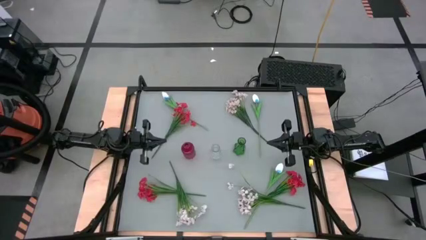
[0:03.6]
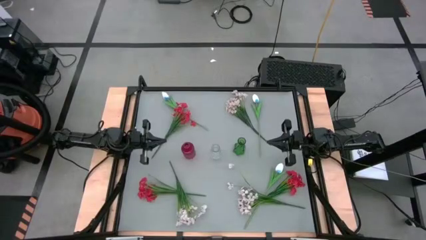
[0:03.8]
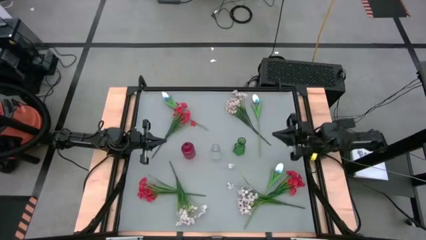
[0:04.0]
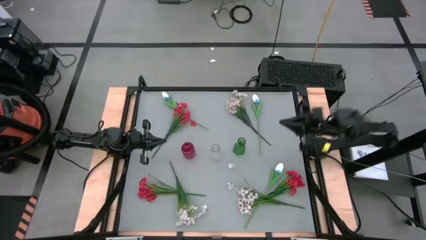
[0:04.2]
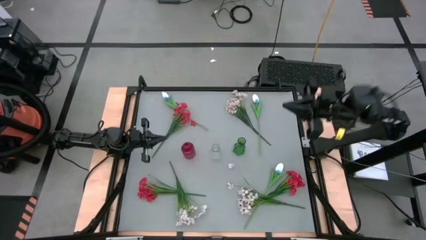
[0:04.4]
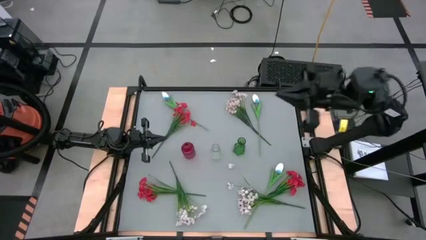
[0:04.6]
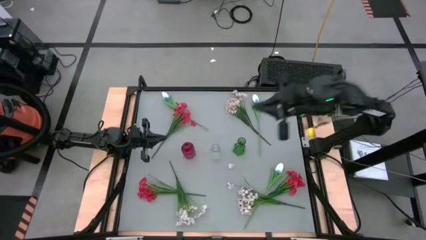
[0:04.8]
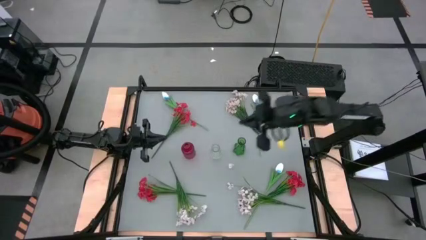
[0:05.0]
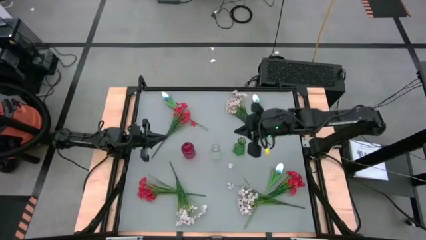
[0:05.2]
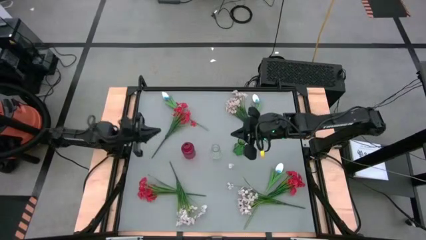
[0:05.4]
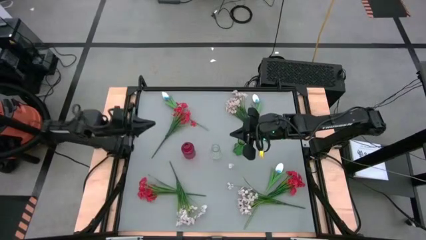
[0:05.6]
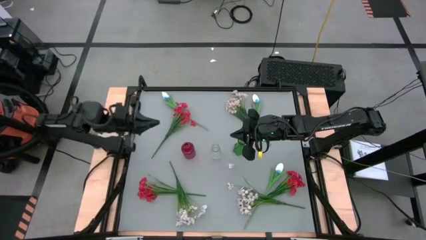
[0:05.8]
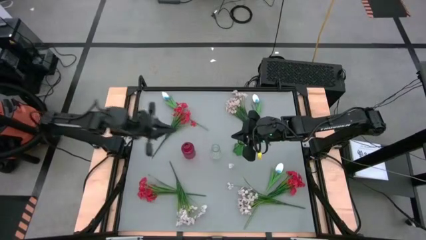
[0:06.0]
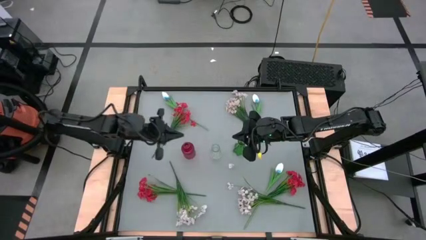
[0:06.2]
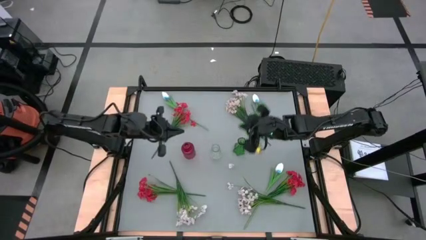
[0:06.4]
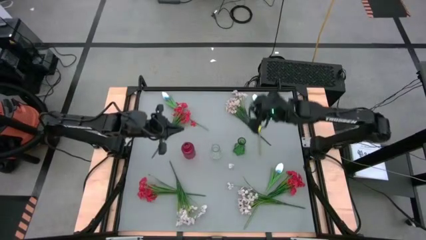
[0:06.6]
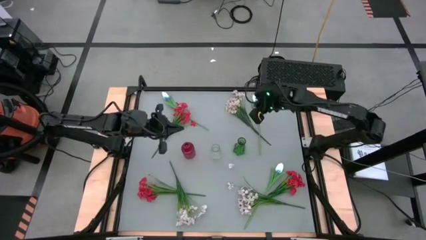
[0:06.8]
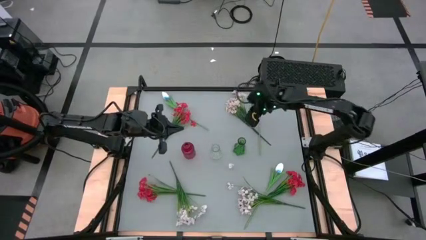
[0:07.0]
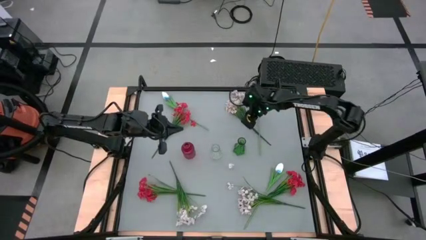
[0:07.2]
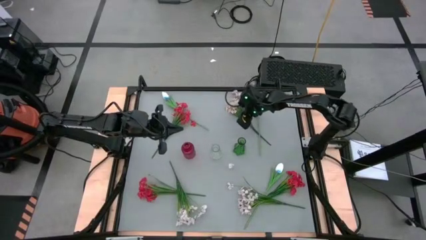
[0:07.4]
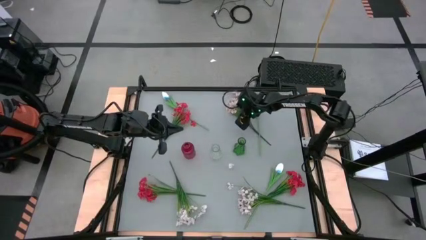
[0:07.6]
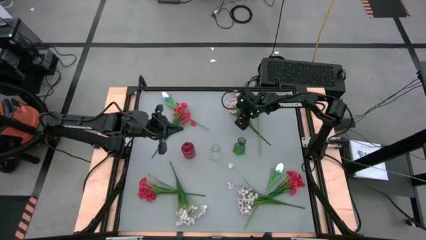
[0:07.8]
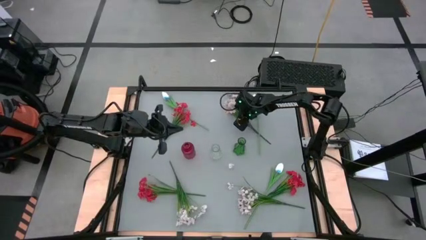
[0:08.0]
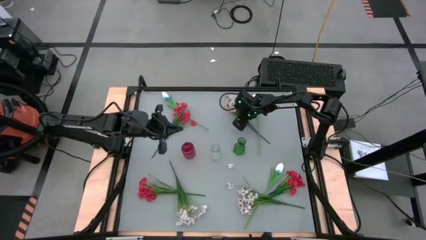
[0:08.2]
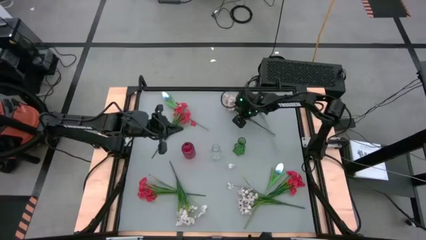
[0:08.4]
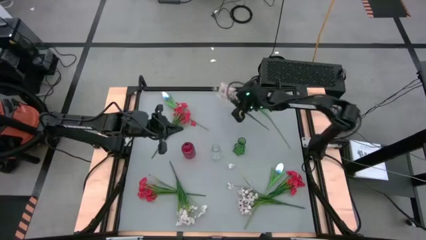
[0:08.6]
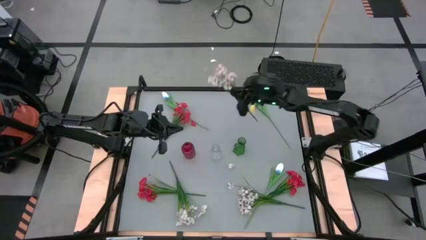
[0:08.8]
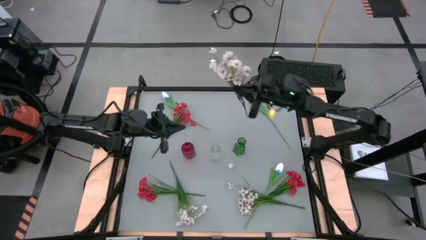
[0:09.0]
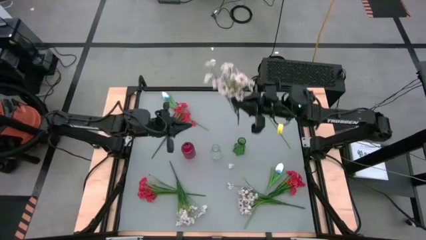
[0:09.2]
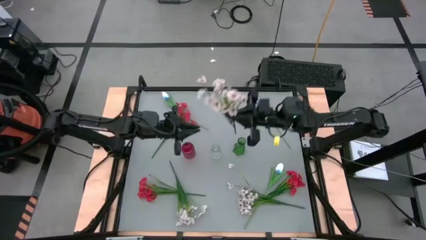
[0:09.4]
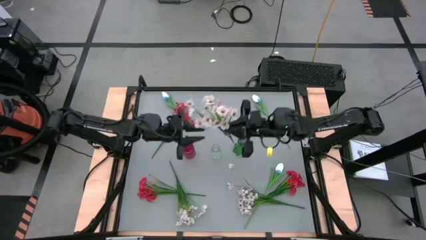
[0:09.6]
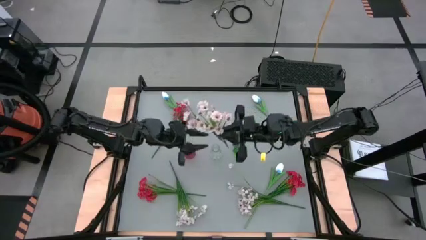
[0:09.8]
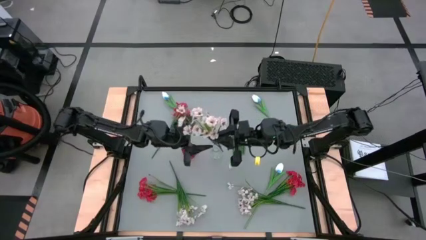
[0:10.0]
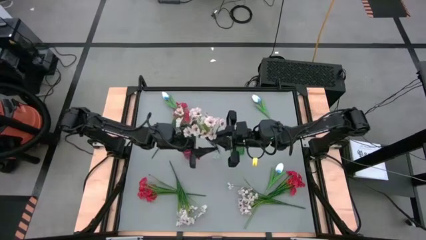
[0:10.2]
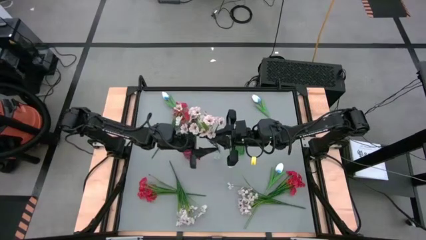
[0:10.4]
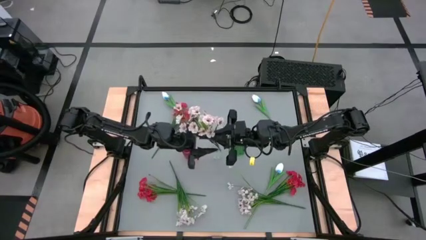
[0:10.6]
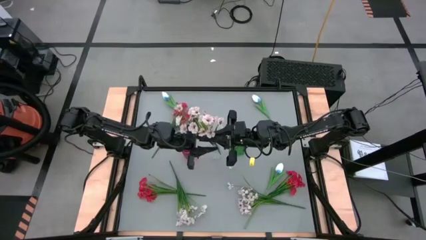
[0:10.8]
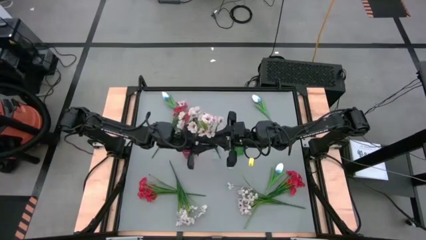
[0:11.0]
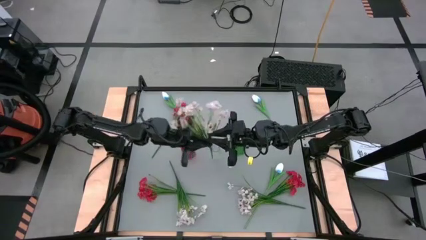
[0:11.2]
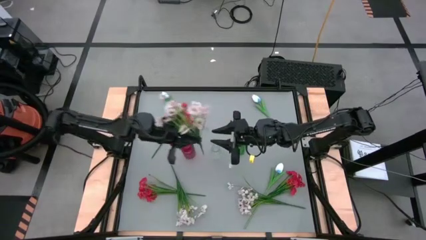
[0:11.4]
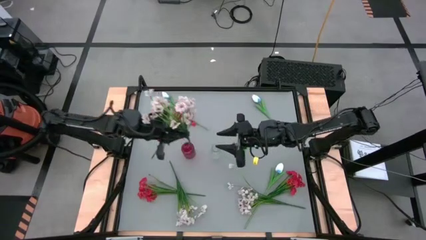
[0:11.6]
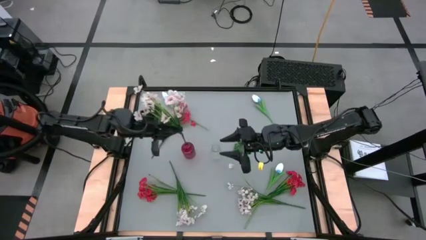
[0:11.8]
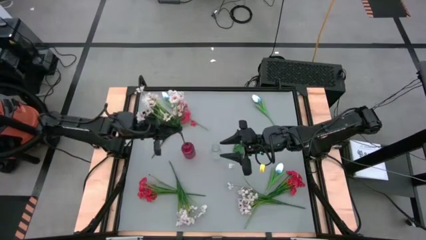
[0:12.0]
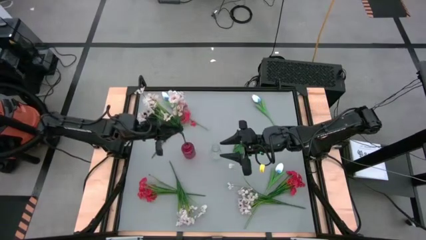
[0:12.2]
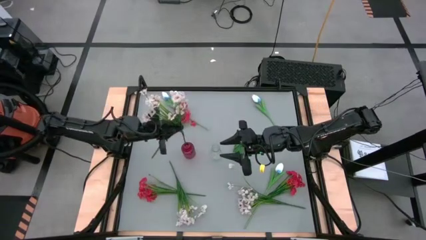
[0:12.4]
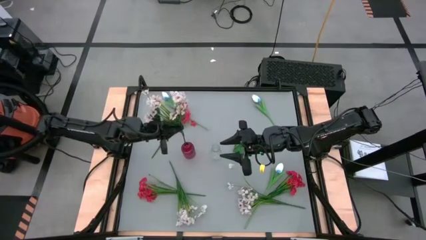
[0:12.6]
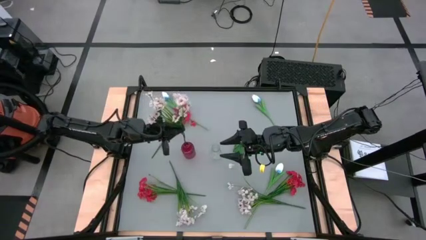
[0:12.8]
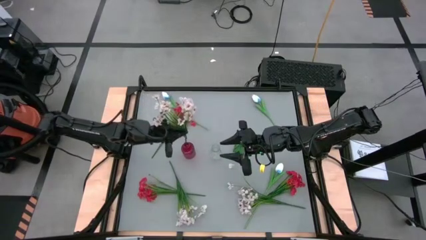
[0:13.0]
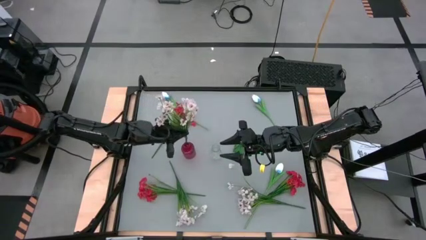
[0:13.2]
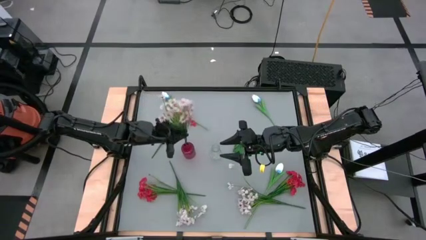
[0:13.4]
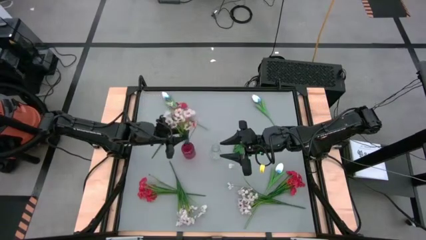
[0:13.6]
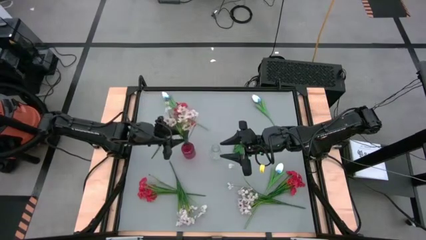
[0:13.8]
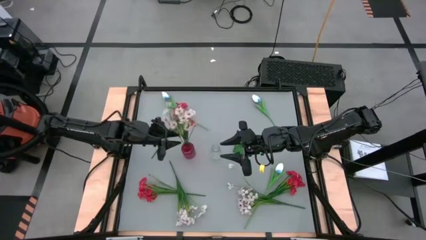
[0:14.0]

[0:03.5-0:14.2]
Task: Sort flowers into vase by color
Put the top right white flower into the red flower vase
